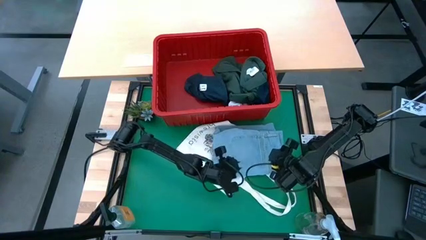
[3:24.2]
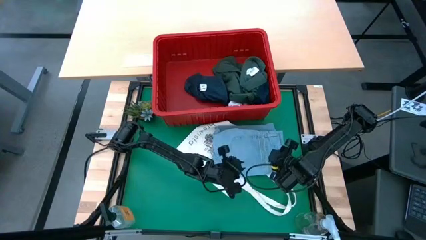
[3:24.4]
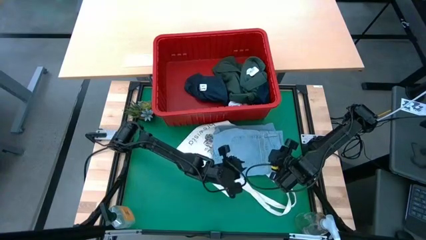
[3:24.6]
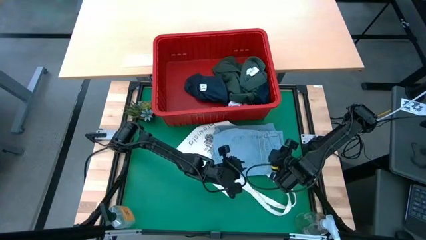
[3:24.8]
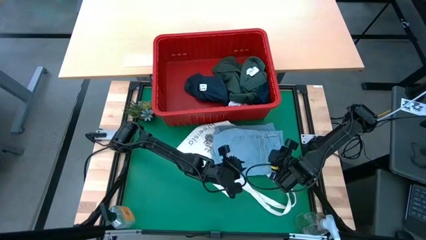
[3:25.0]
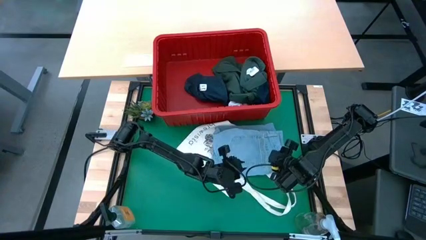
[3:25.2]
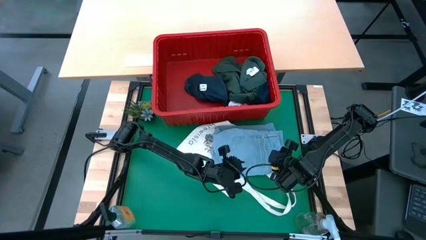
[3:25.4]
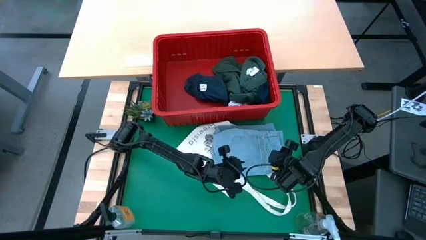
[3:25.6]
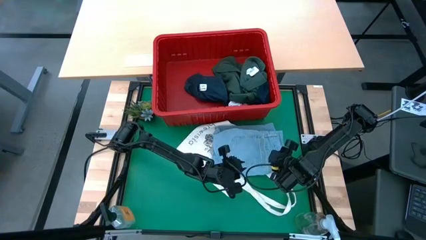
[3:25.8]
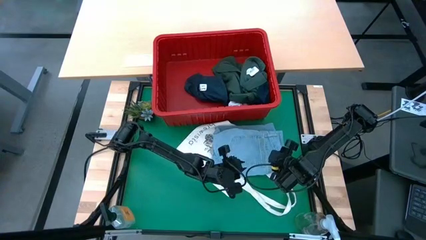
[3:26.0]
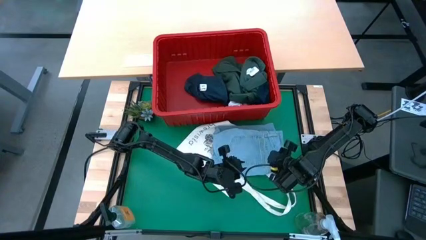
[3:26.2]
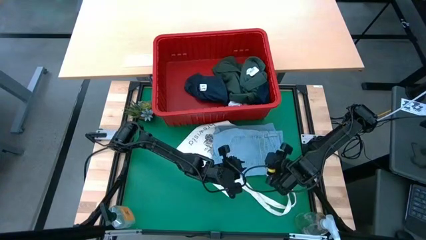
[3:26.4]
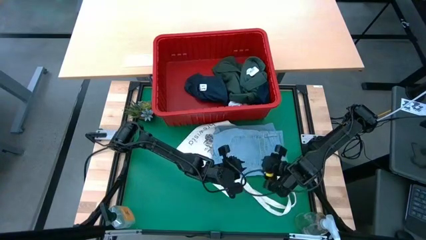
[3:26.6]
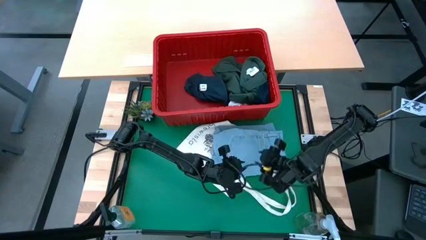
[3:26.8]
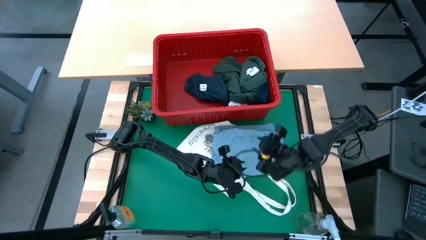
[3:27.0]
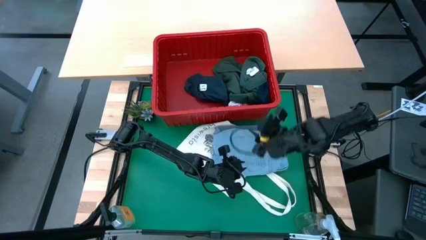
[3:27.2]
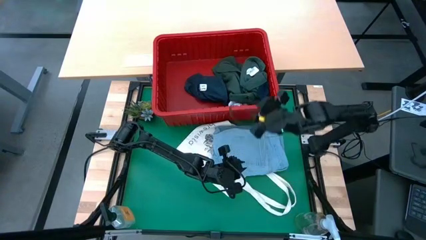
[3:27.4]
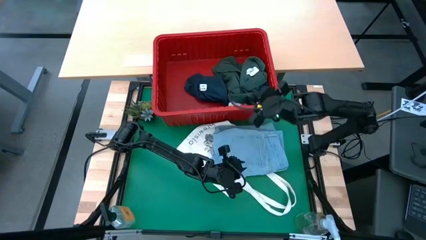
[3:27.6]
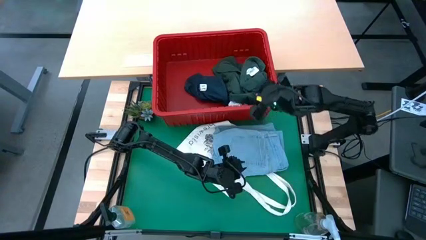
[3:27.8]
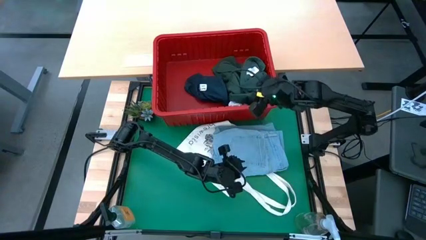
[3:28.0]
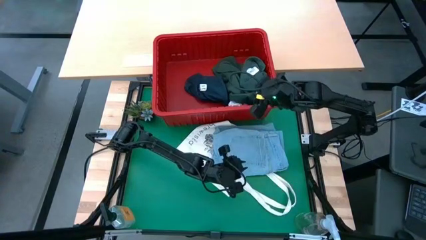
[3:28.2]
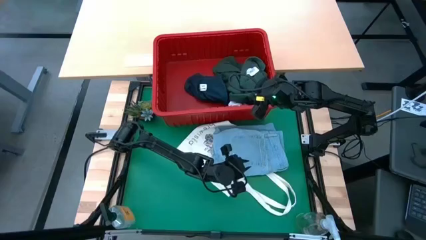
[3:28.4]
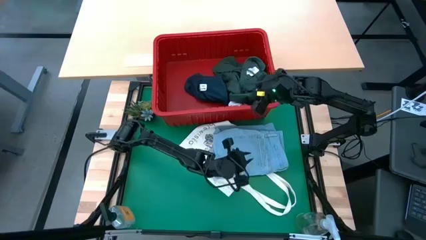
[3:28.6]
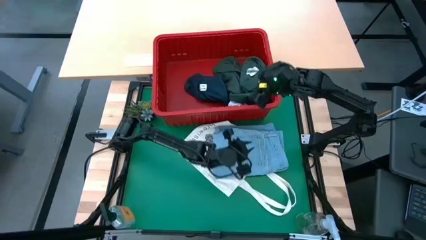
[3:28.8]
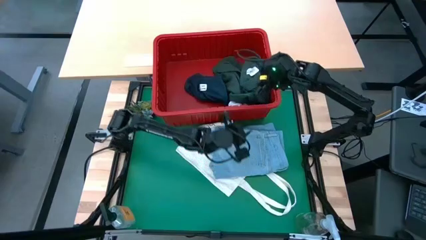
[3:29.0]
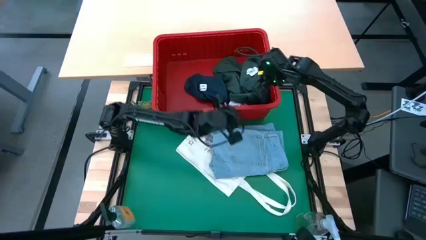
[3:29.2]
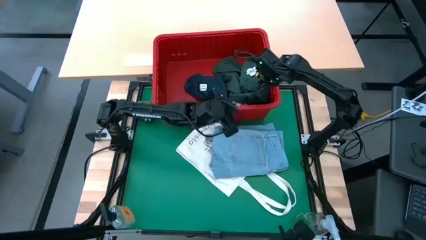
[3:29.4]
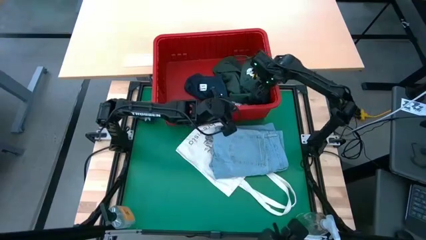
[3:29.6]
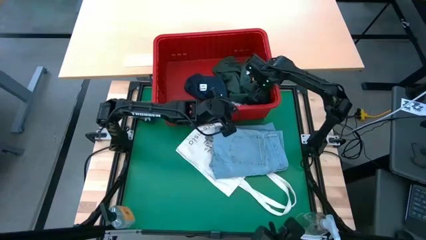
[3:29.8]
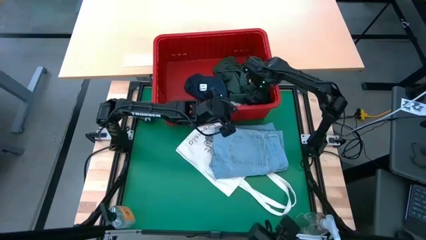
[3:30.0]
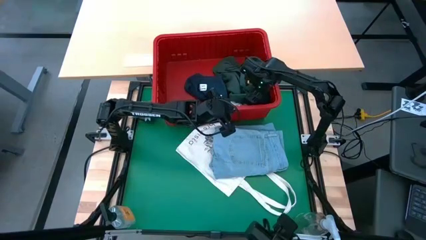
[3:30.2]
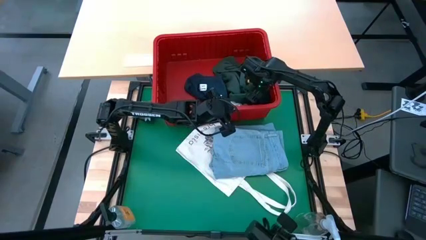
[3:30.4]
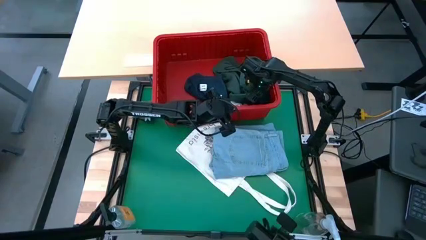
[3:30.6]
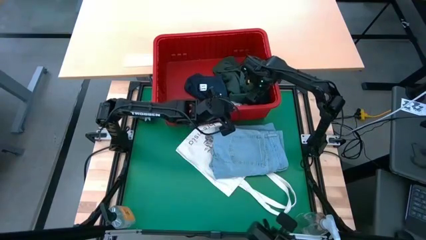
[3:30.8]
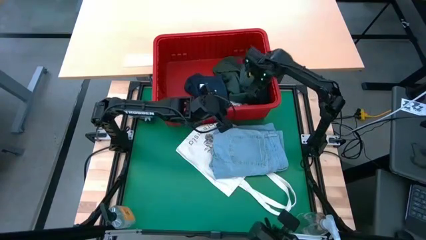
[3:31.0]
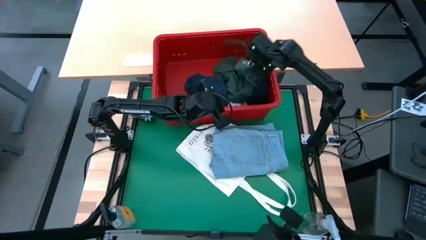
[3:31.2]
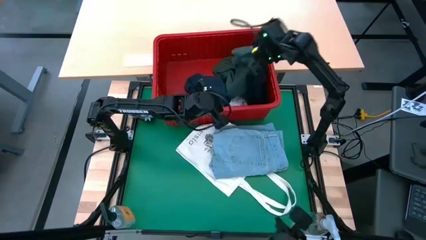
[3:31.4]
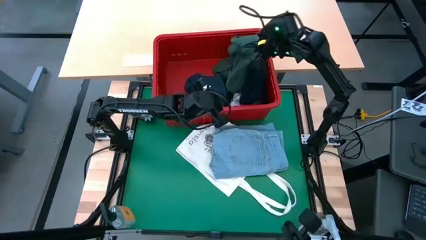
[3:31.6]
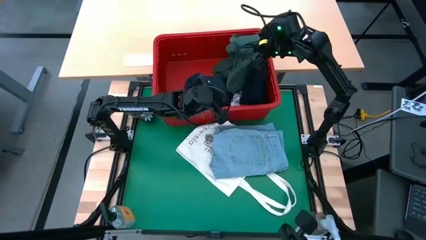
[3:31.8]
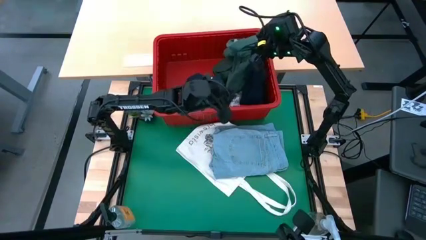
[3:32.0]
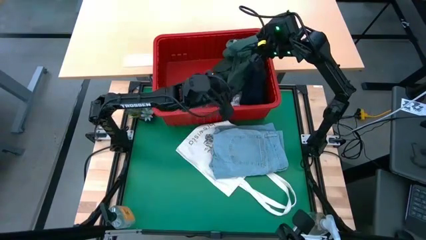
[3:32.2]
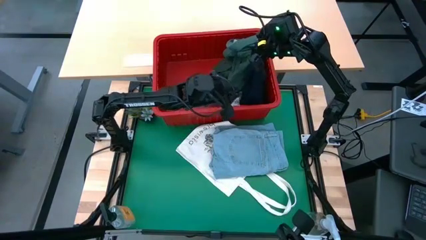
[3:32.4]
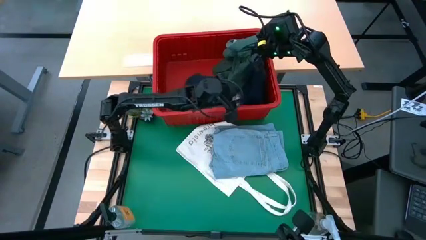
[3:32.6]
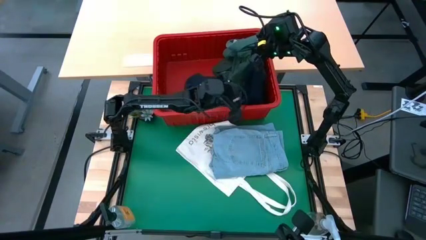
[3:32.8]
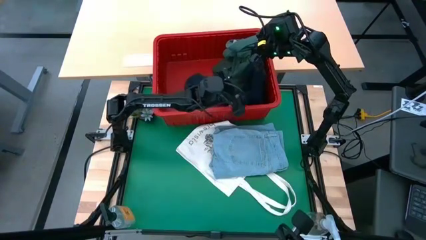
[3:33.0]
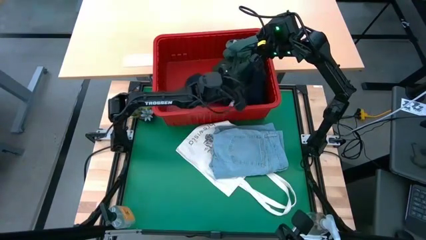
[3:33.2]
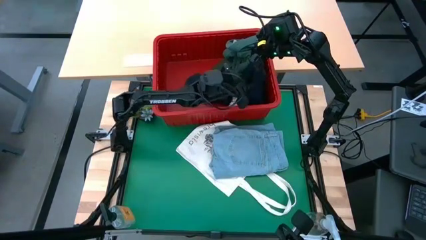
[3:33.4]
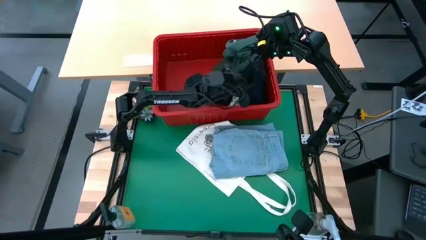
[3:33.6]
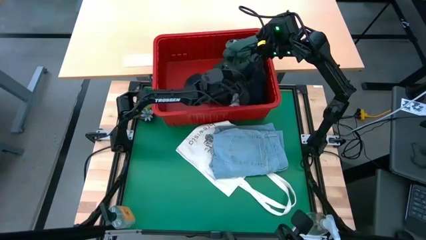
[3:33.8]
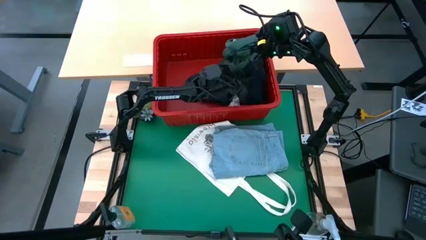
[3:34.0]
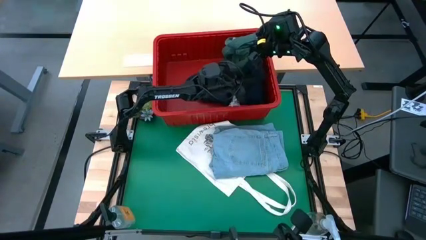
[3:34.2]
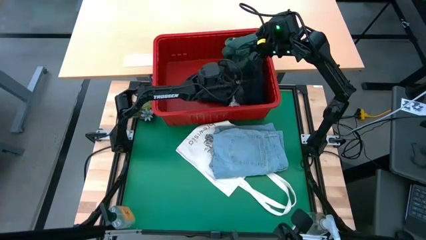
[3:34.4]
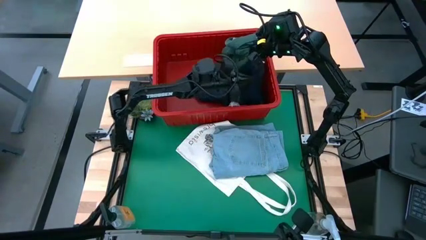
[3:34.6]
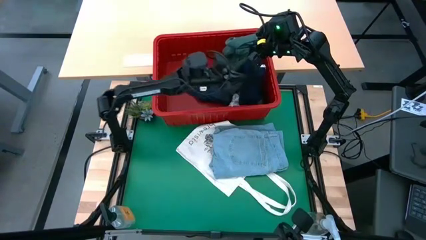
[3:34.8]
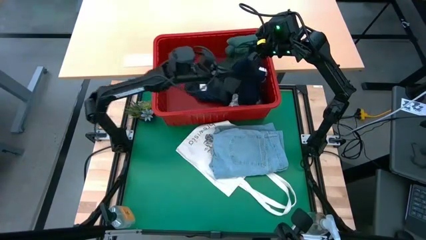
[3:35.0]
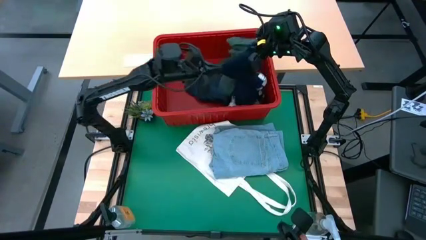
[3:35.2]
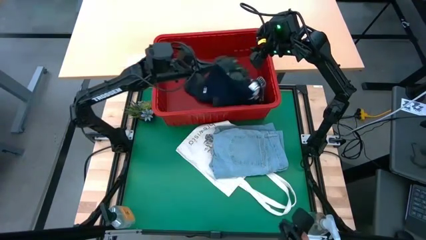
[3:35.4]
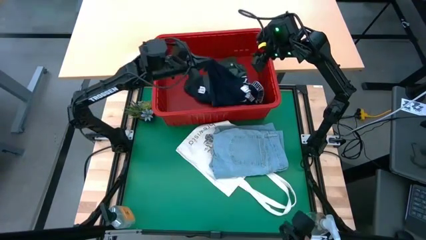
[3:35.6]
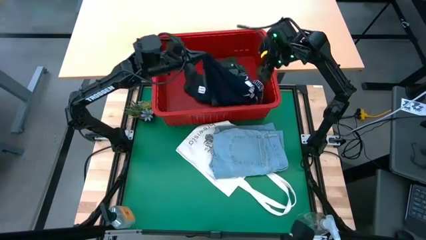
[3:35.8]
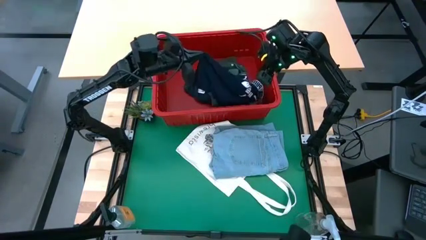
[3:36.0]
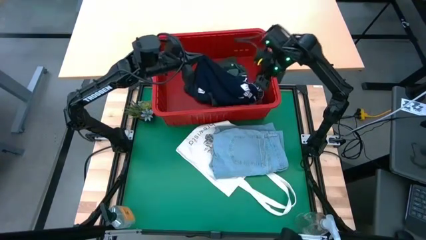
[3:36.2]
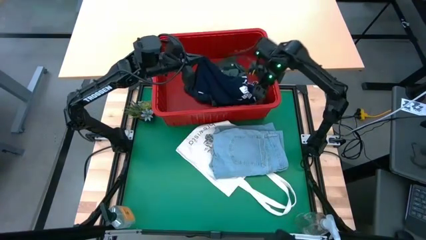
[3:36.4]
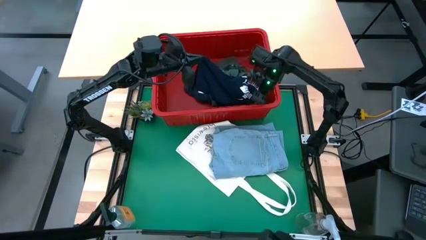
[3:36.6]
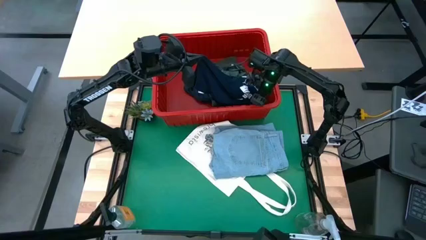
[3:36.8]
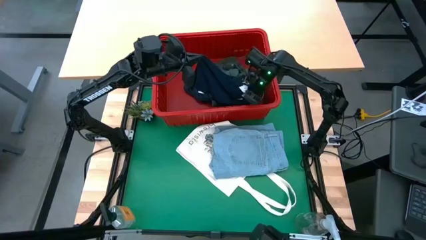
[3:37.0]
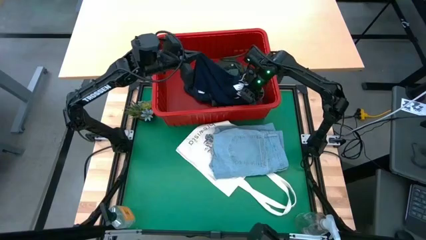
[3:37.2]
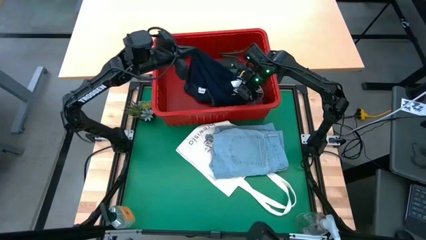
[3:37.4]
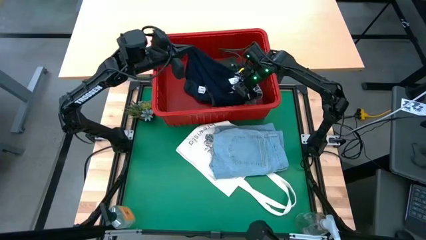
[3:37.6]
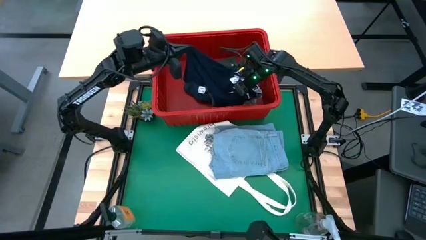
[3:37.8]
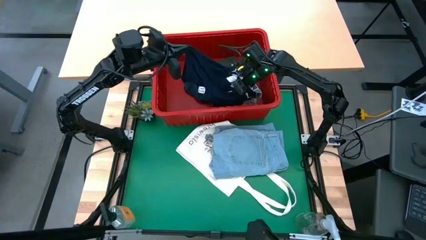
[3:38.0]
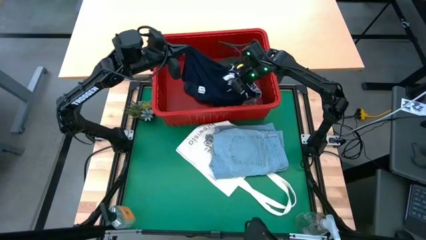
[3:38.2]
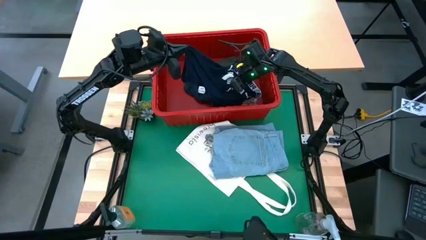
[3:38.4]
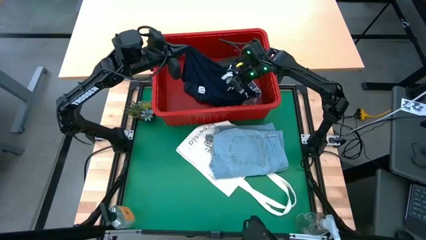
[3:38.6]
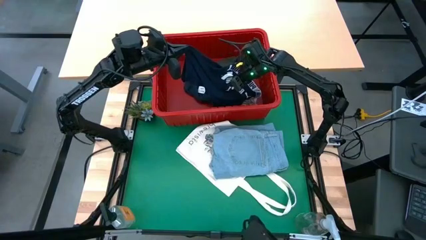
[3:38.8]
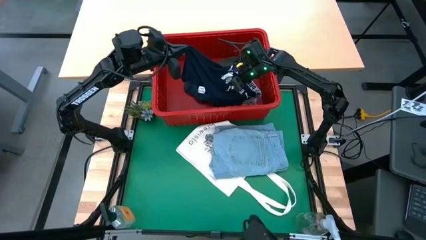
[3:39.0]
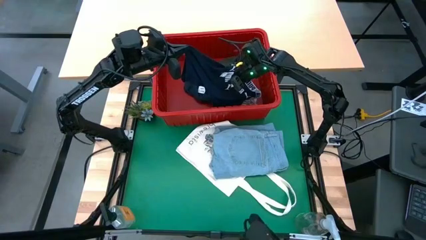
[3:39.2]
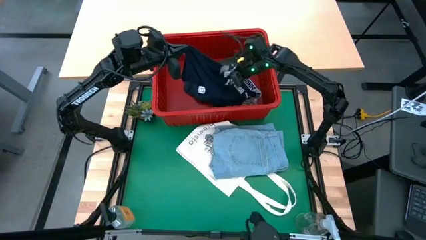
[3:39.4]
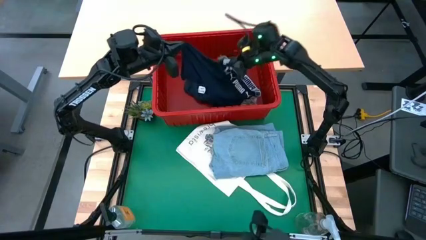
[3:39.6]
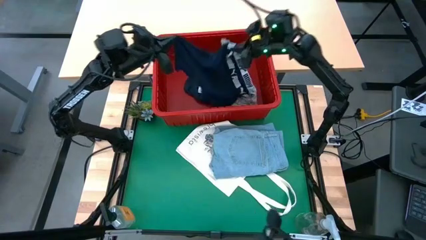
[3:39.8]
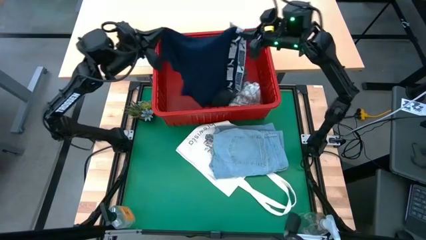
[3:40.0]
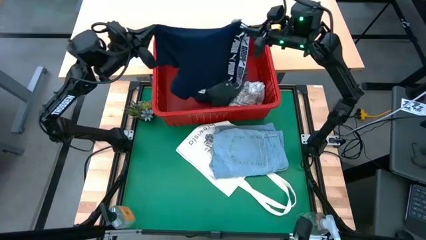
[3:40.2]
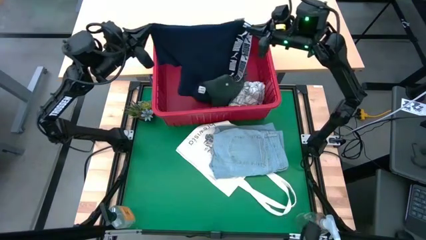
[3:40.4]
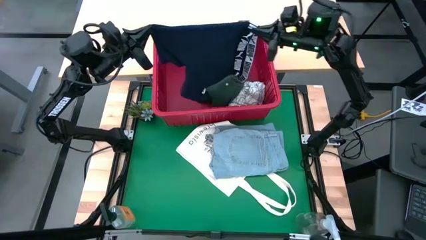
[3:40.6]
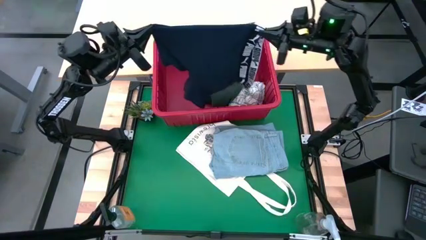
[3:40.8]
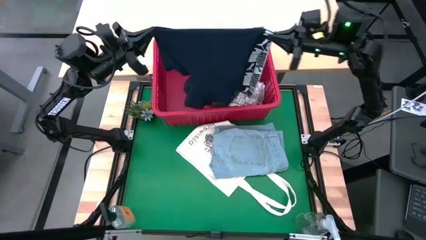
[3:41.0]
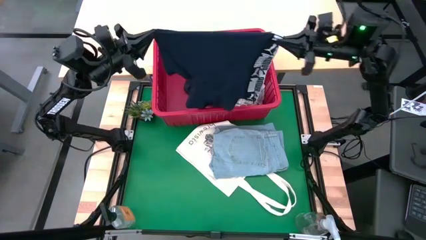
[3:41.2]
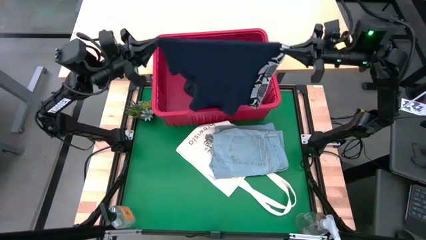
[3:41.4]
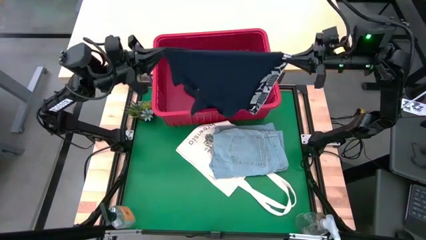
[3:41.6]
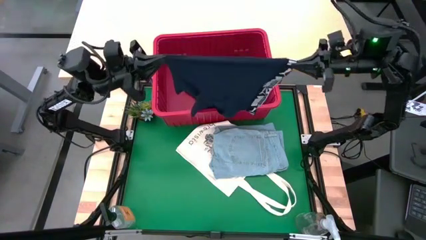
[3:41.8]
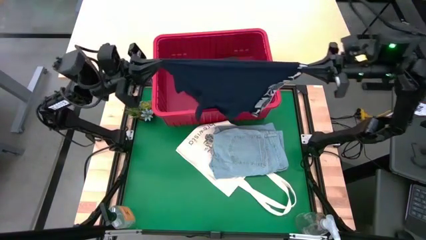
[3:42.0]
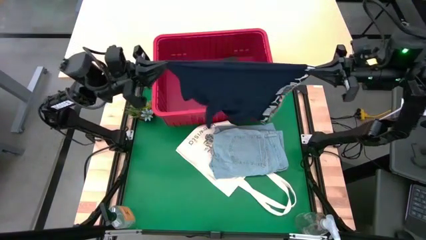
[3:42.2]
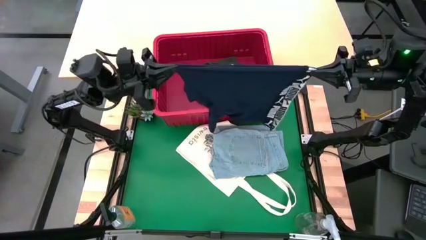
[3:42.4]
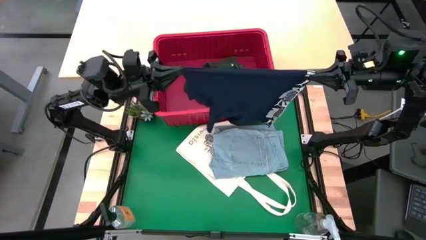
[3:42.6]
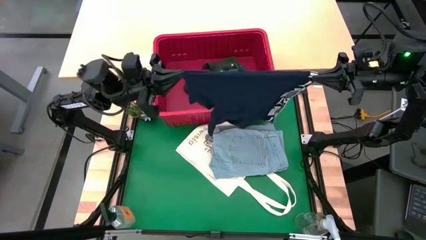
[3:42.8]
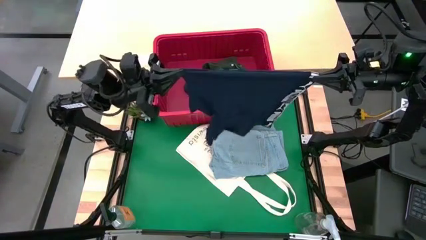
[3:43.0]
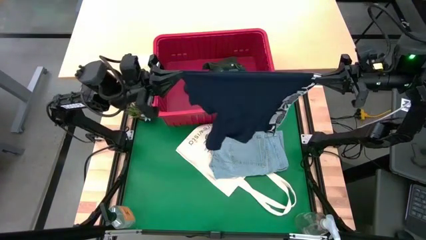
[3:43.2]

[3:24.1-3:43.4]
Task: Fold laundry
Fold the dark blue boxer
